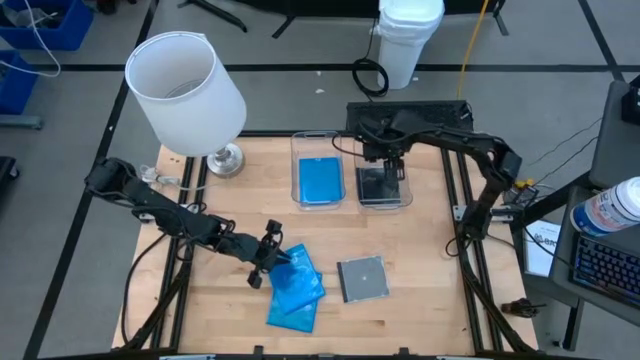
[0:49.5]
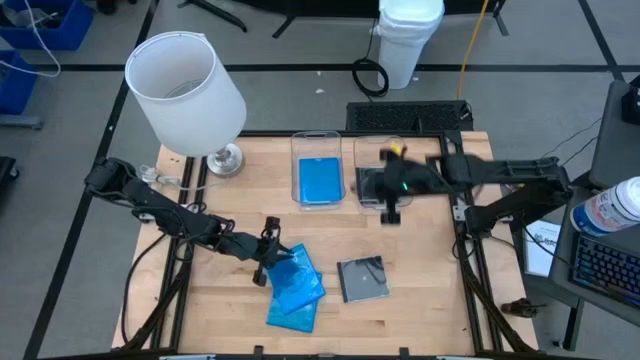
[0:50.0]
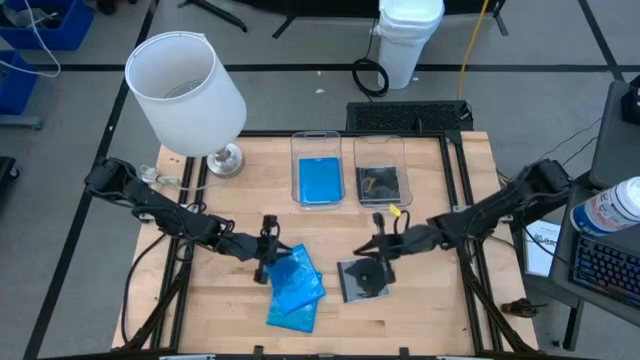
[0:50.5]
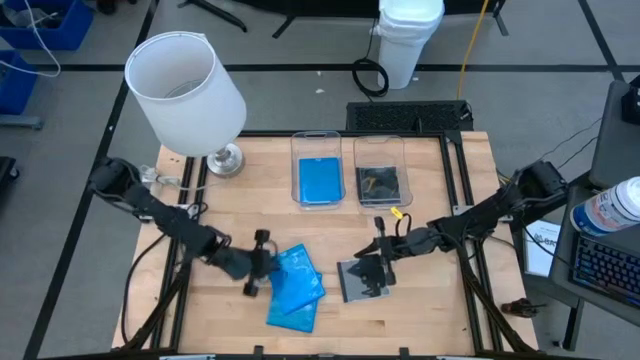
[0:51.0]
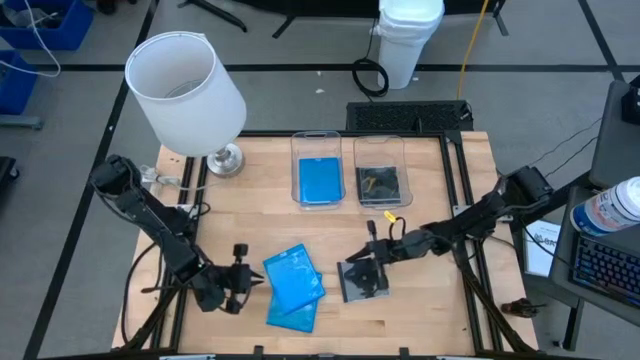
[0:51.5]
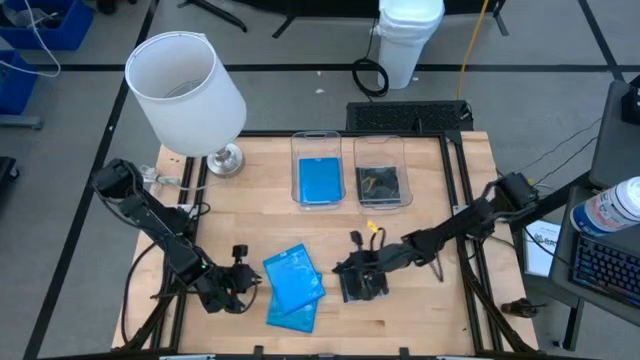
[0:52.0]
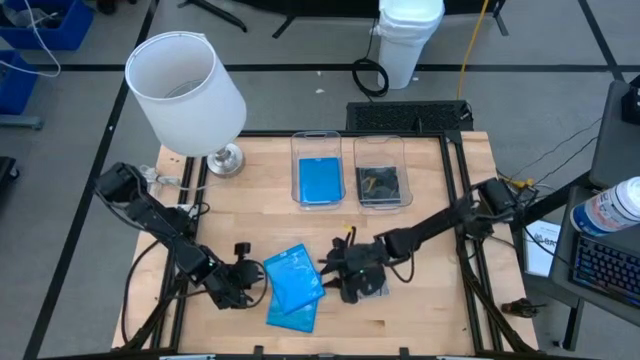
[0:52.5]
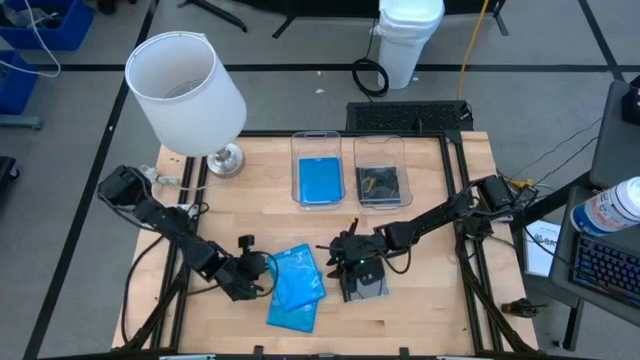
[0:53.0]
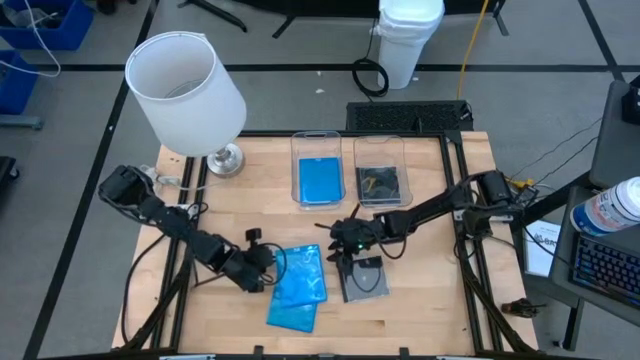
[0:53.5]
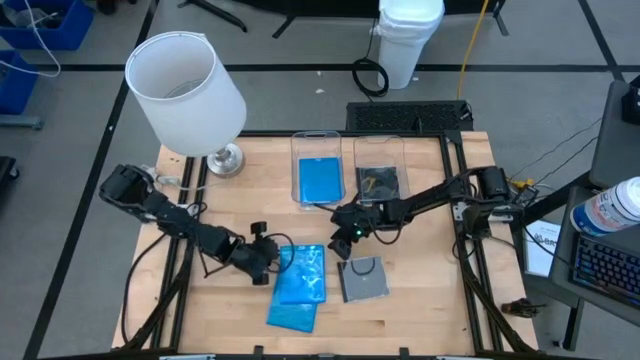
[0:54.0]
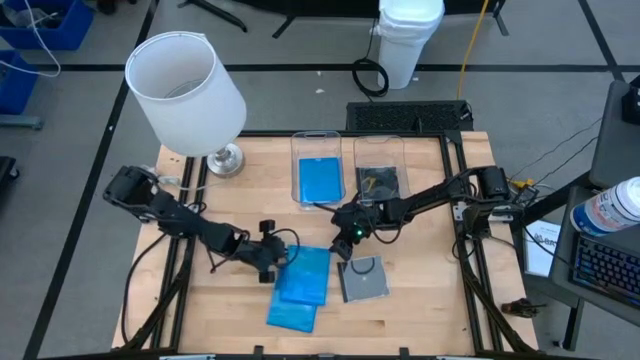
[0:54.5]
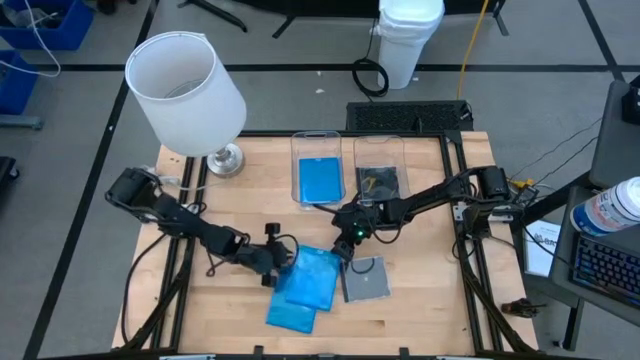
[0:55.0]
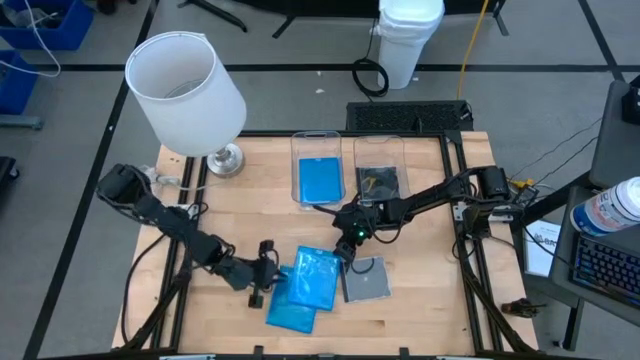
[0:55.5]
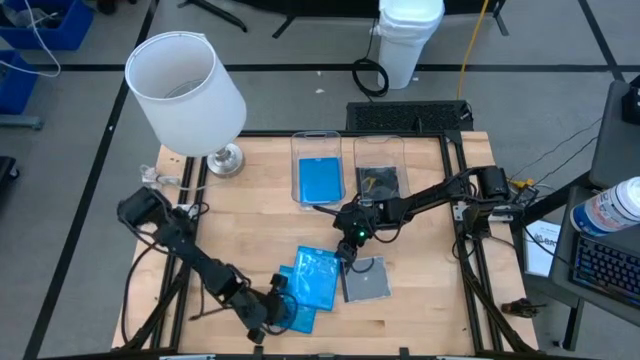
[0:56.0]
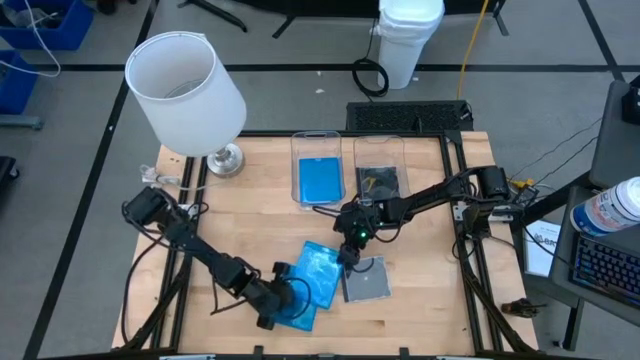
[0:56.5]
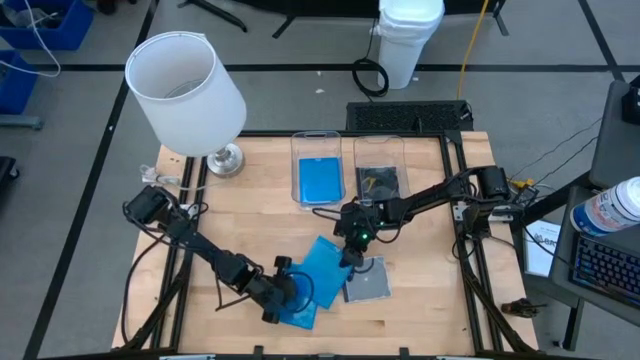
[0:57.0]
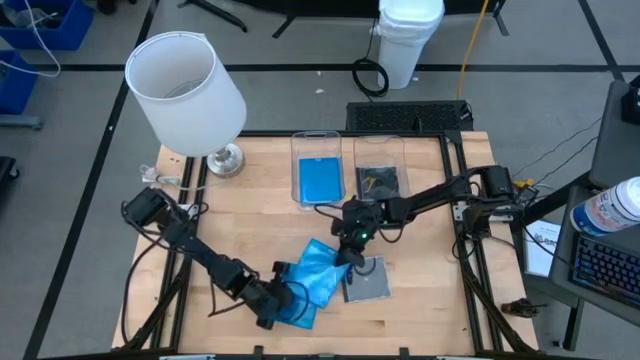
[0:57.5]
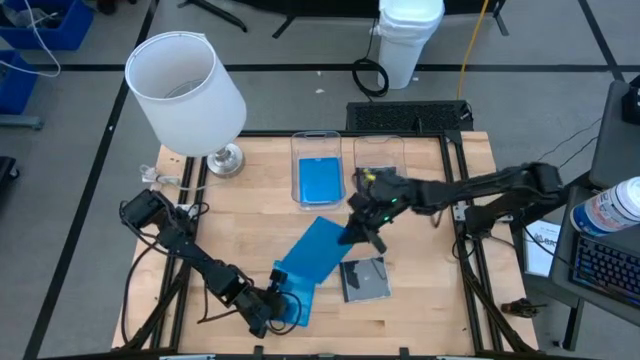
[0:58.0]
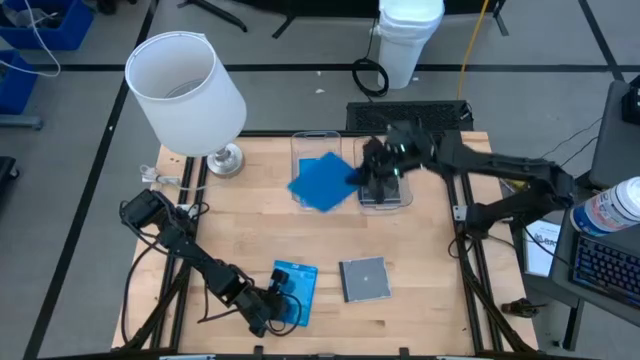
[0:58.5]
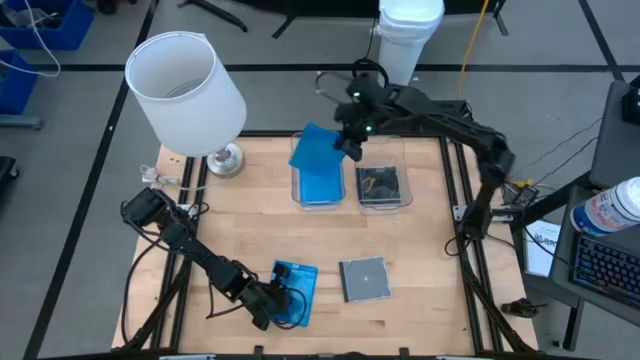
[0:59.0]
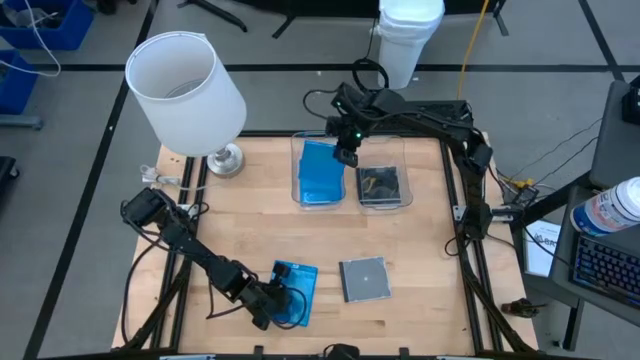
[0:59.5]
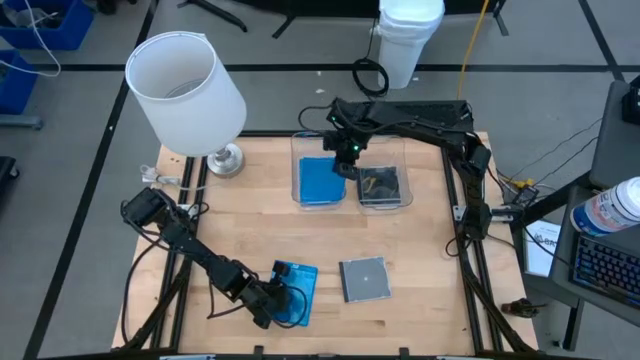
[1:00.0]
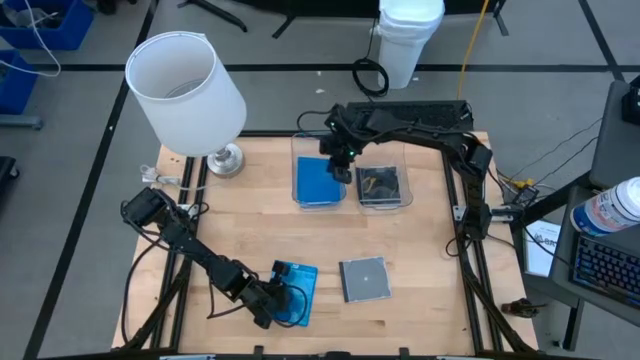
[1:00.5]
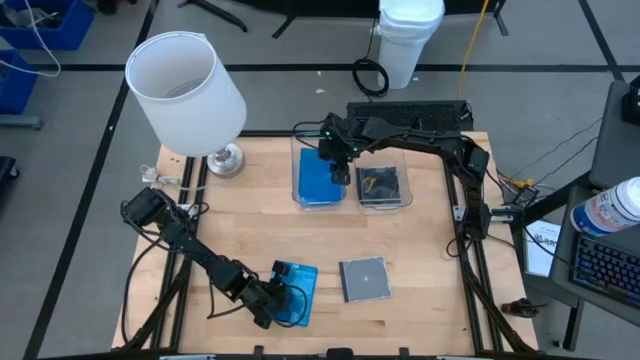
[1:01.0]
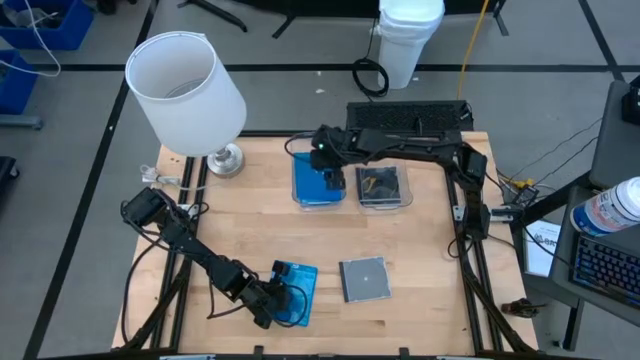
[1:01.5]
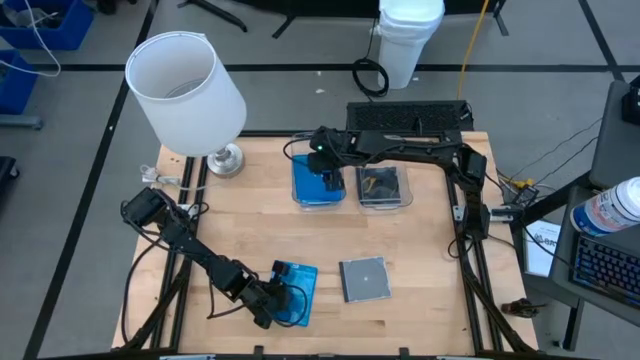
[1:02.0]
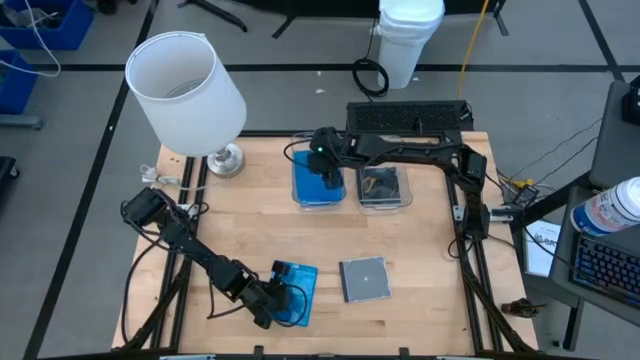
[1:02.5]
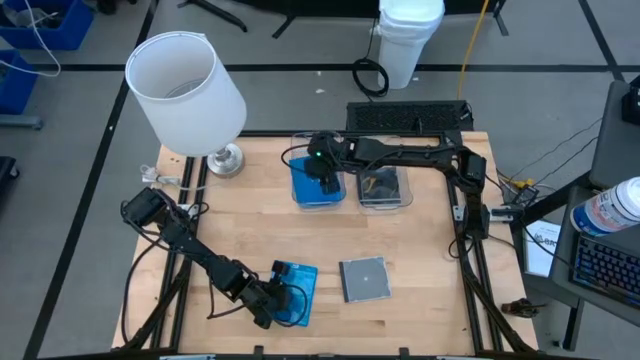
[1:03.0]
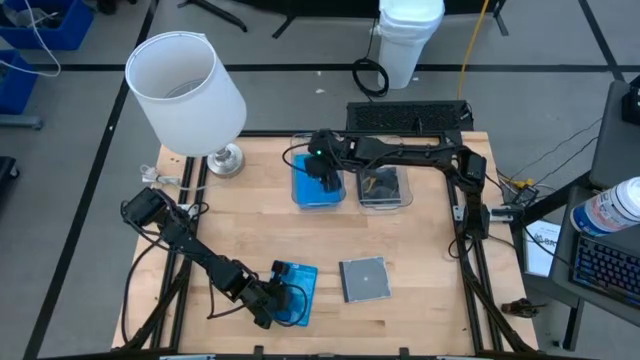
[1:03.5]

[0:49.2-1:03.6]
Task: Pick & place jewel cases by type
Put the top blue CD case into the left transparent bin

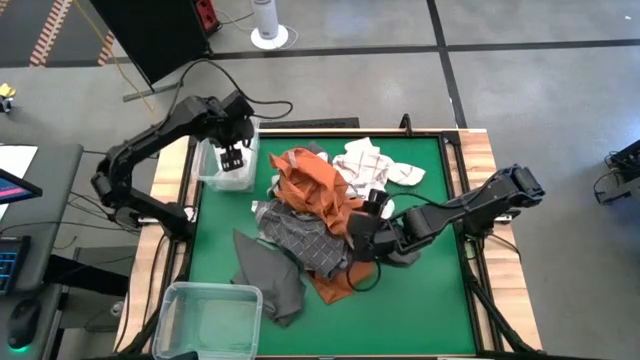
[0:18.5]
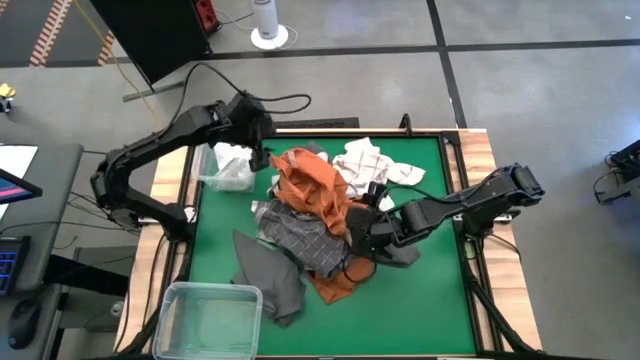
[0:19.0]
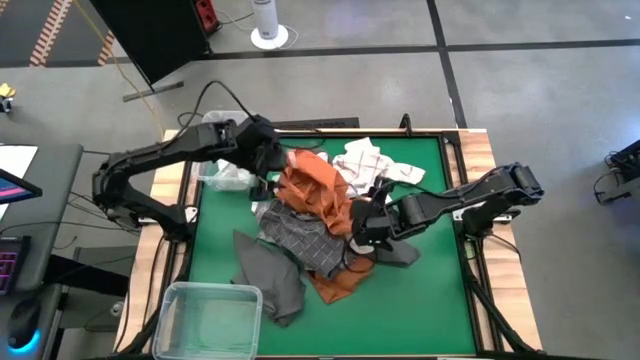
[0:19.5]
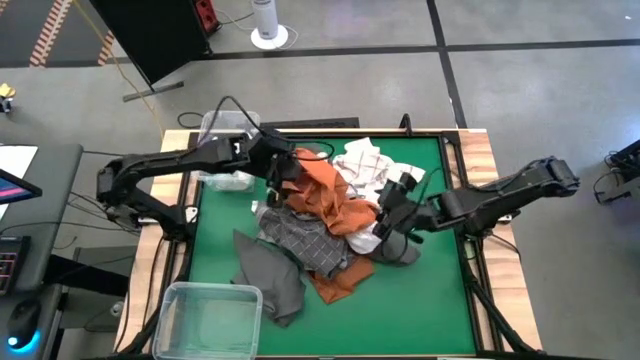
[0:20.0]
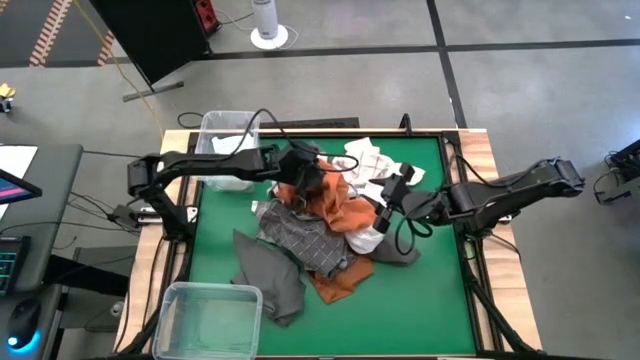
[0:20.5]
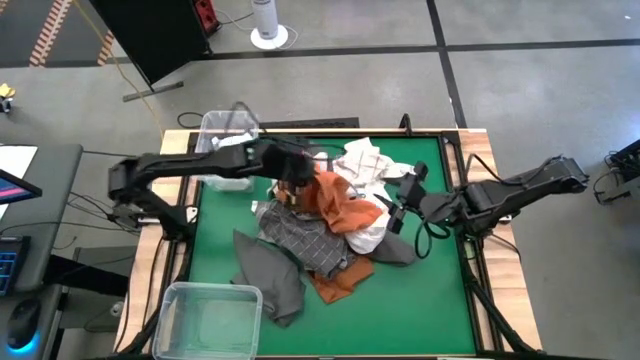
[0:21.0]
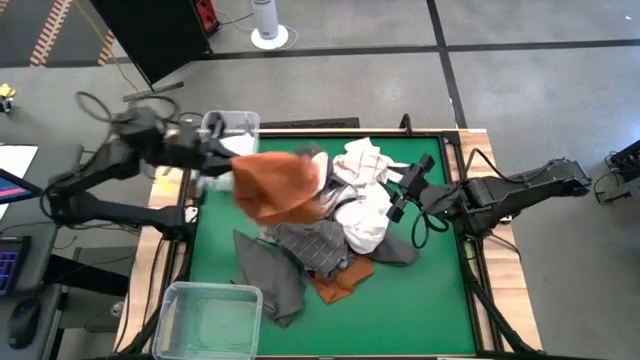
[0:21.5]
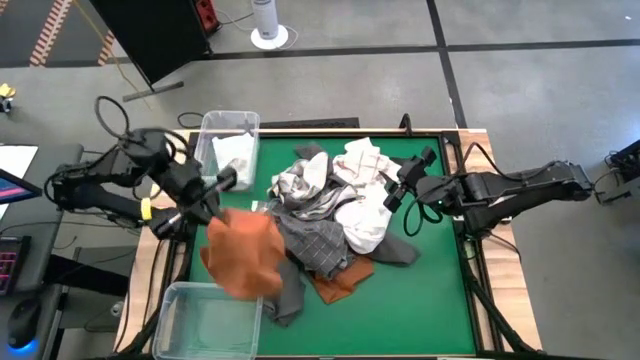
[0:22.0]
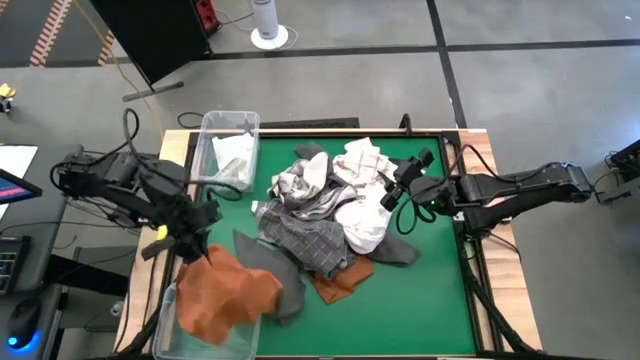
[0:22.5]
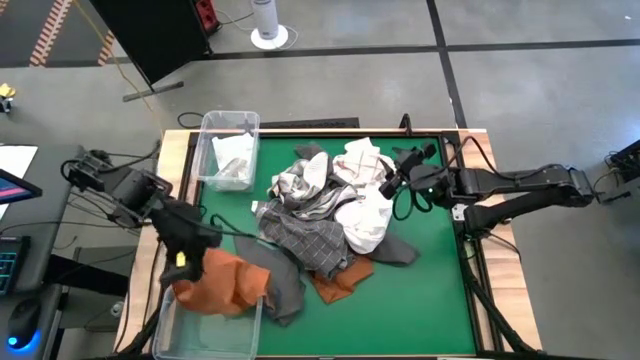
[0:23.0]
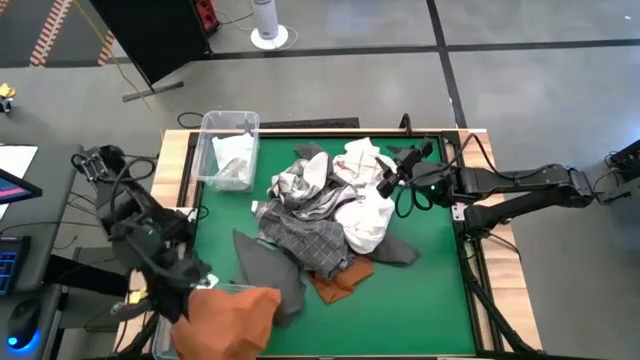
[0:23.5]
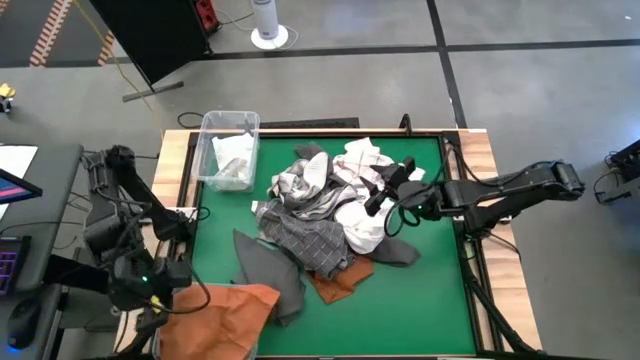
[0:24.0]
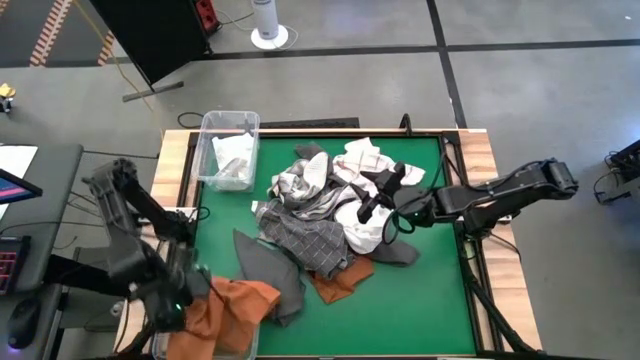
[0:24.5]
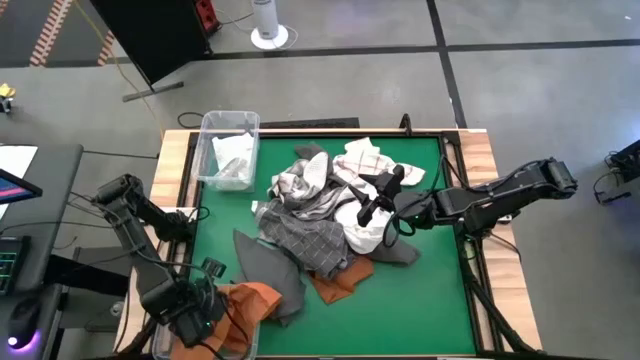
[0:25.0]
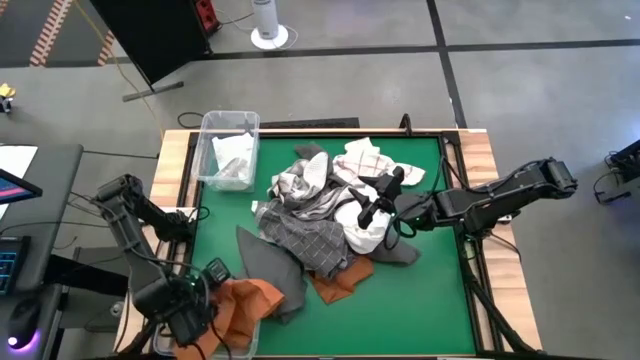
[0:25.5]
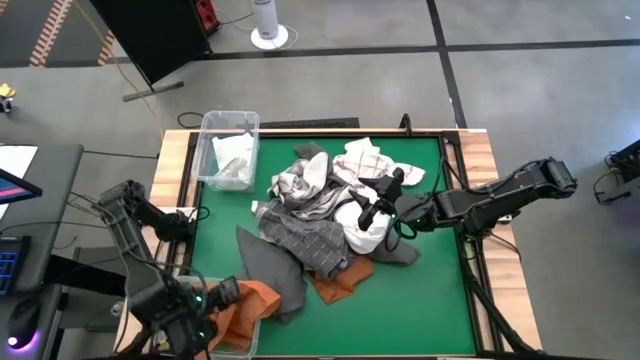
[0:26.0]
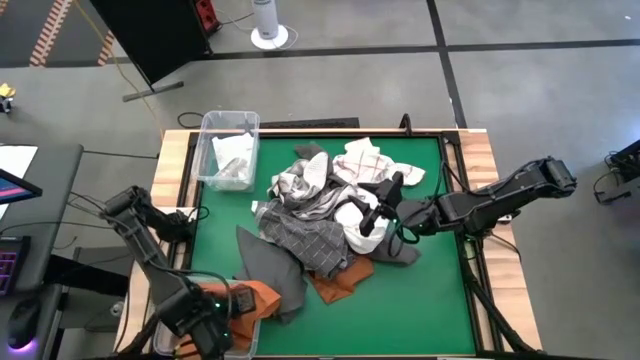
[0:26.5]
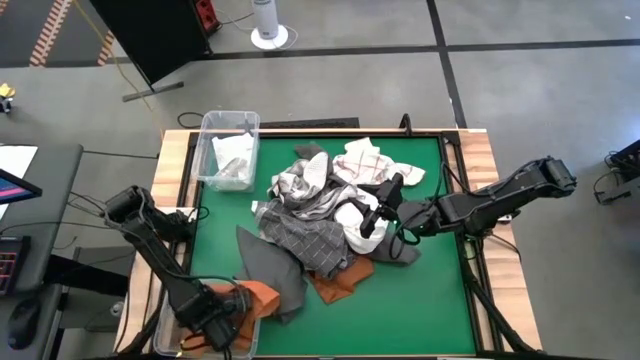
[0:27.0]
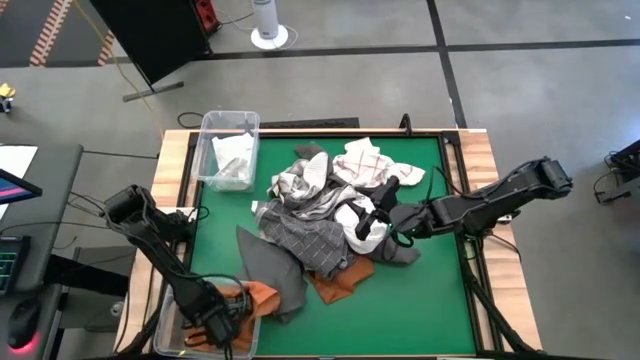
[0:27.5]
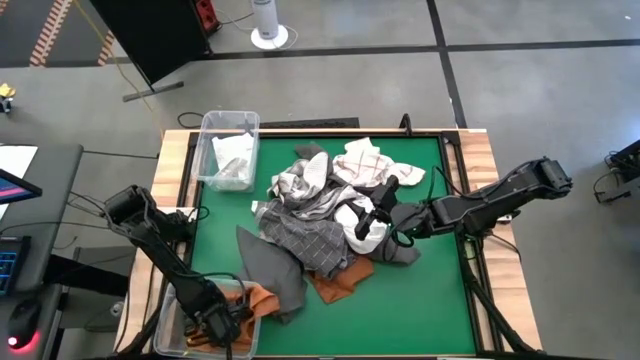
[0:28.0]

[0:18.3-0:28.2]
Task: Sort towels by color in basket
Put the orange towel into the bottom transparent bin
